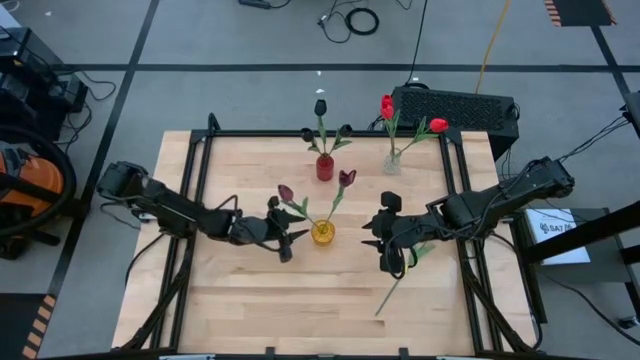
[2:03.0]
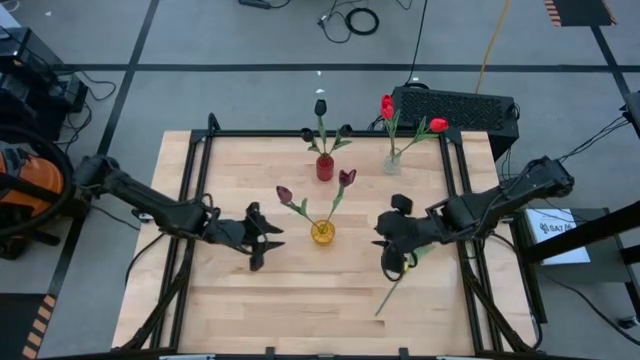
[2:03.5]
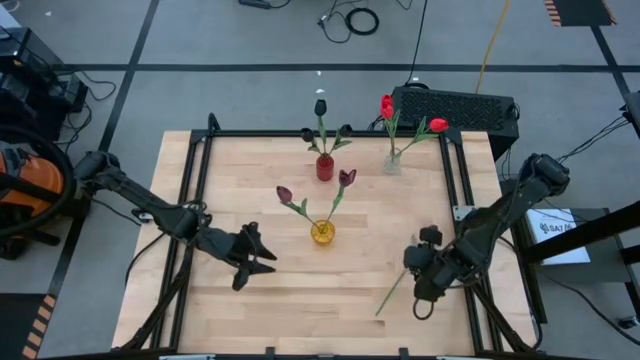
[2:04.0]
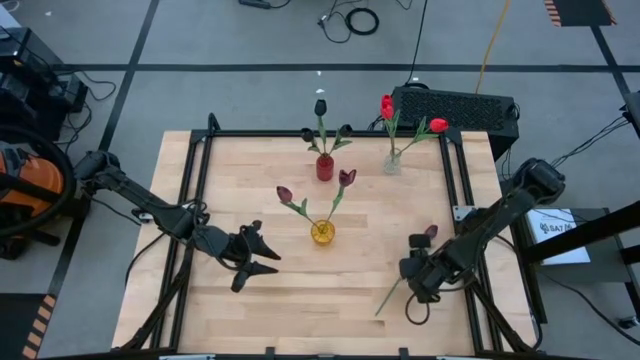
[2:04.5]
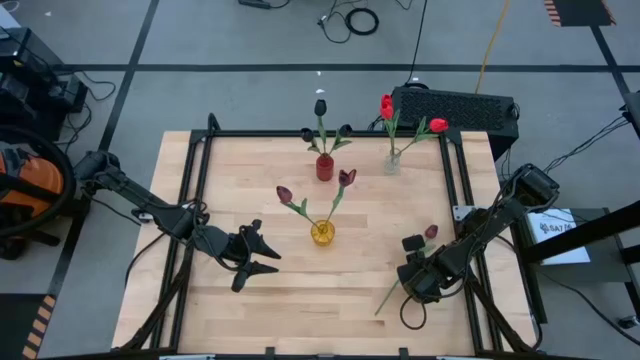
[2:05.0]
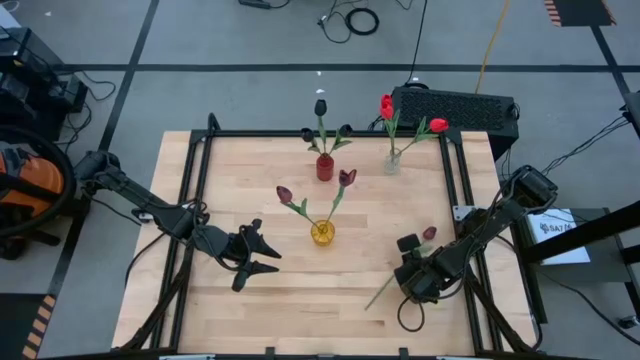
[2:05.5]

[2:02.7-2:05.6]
Task: Sort flowers into vase by color
Put the dark red flower into the yellow vase

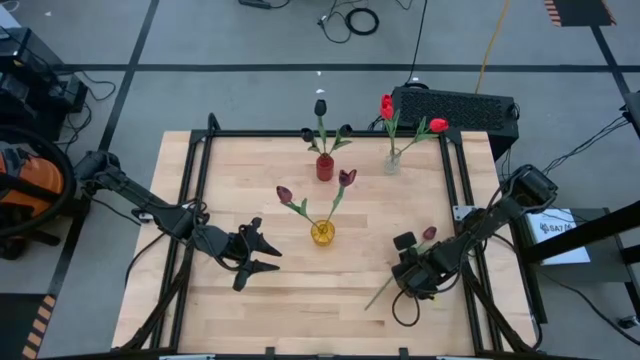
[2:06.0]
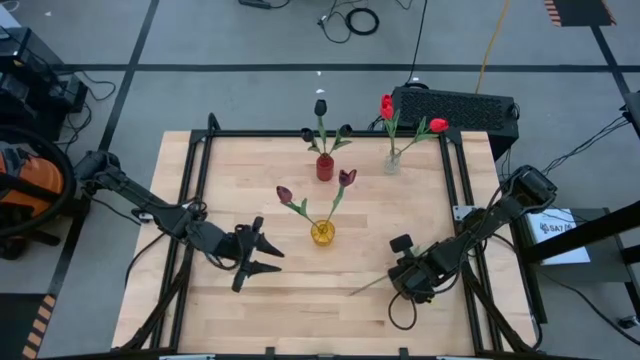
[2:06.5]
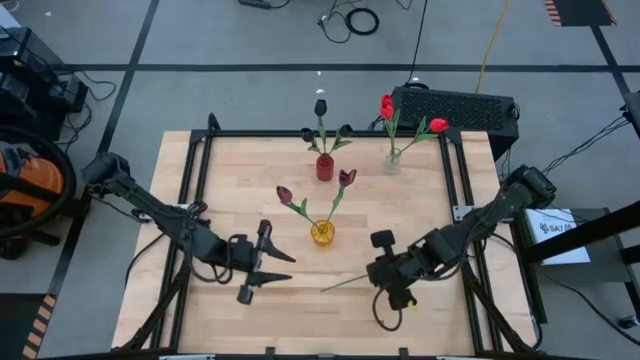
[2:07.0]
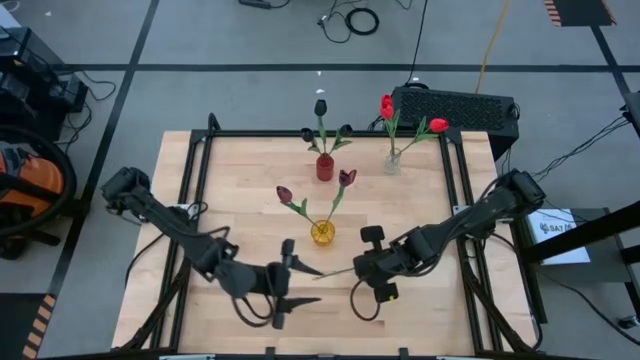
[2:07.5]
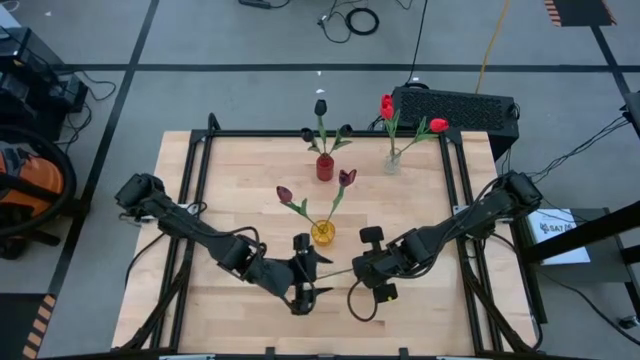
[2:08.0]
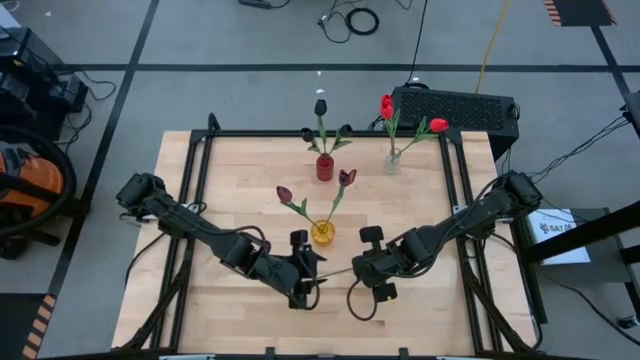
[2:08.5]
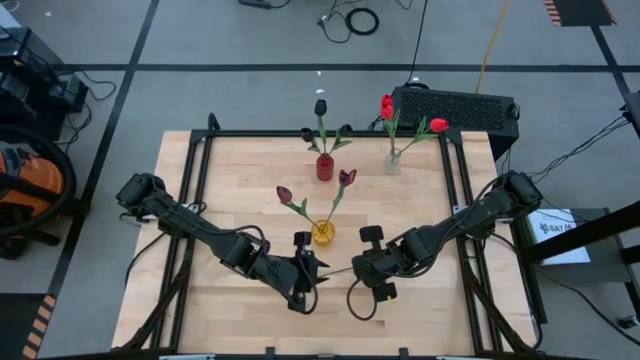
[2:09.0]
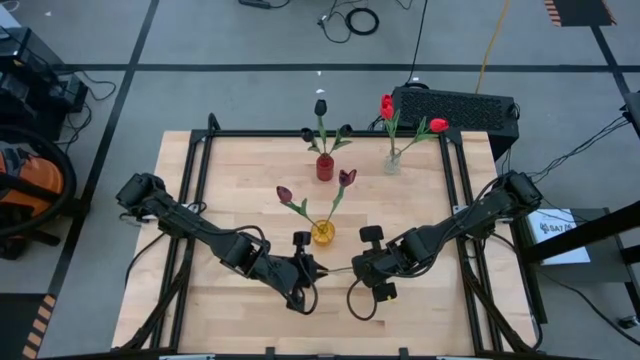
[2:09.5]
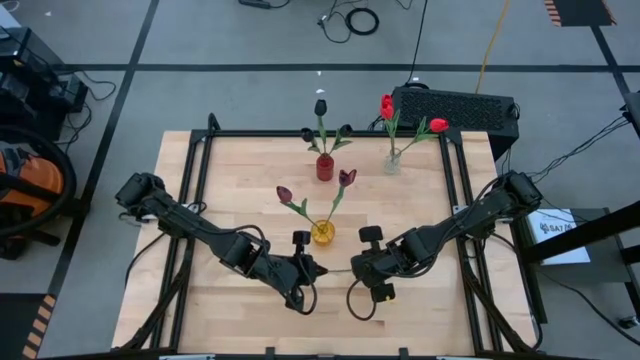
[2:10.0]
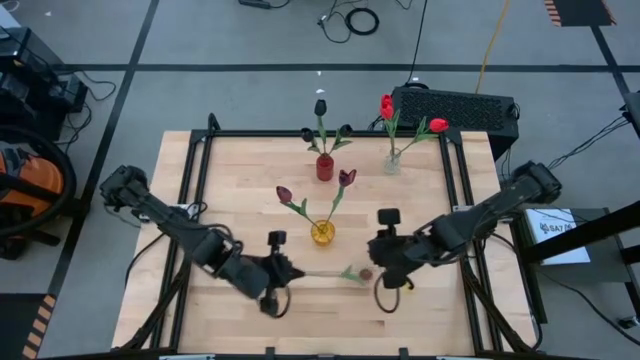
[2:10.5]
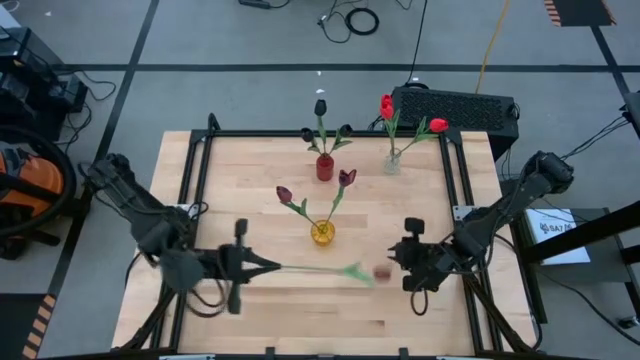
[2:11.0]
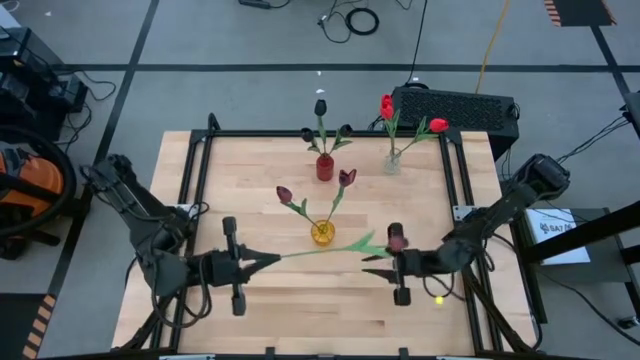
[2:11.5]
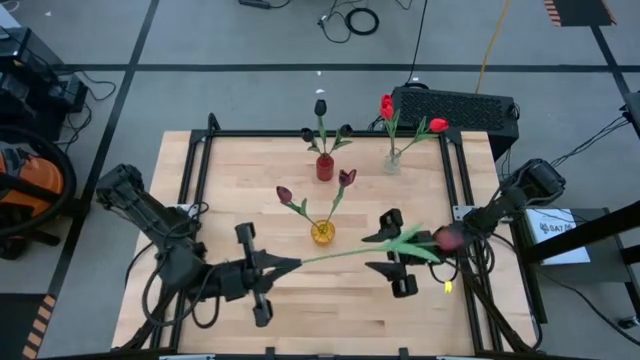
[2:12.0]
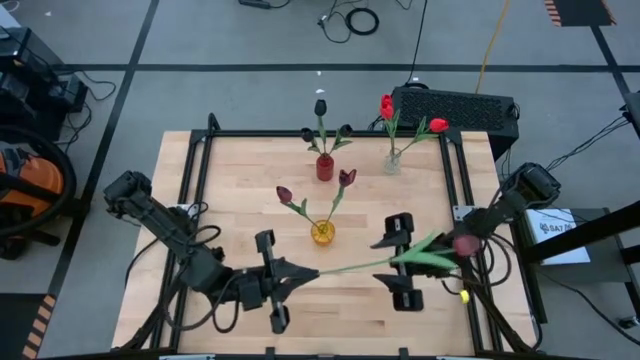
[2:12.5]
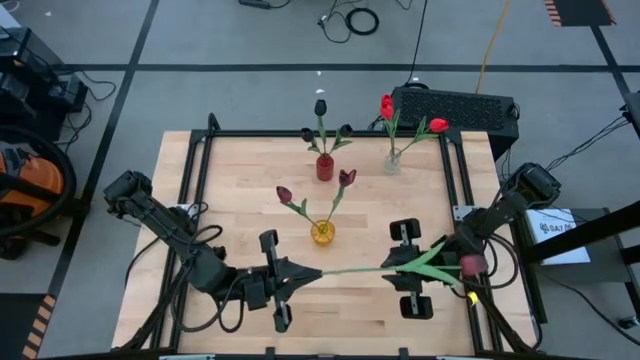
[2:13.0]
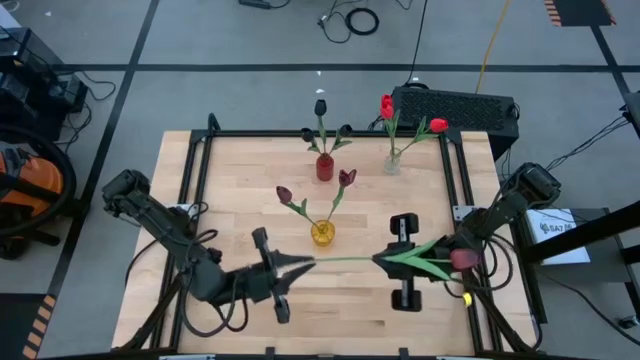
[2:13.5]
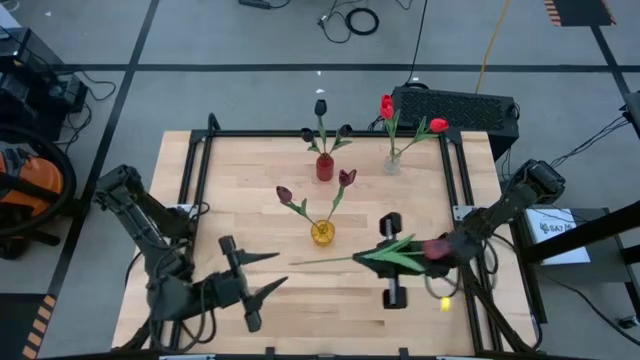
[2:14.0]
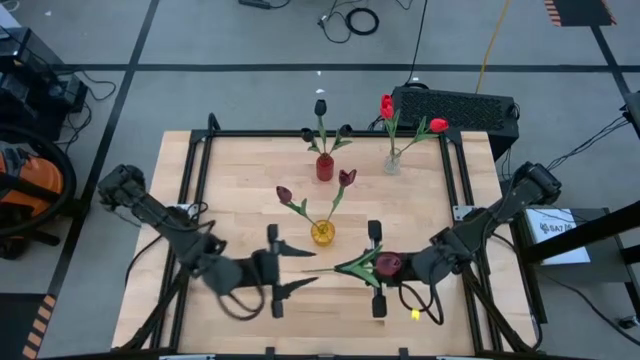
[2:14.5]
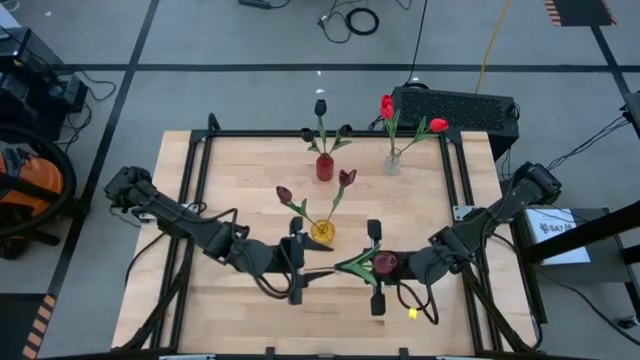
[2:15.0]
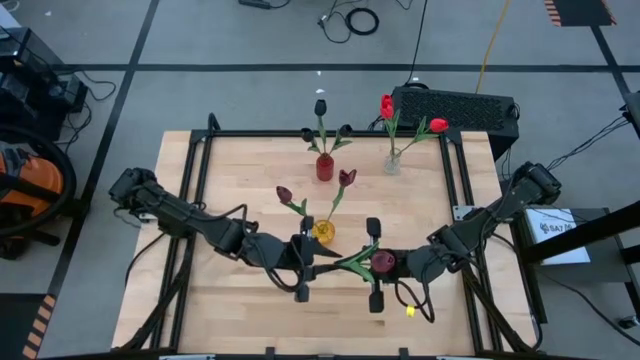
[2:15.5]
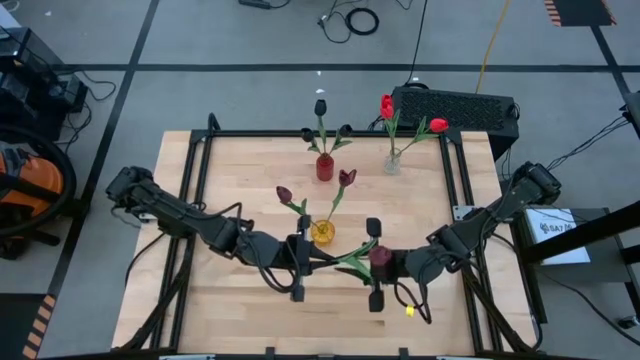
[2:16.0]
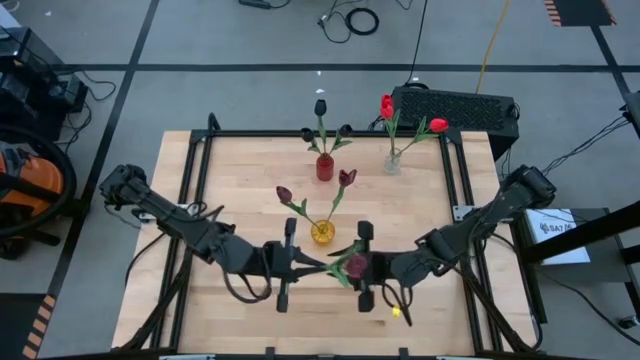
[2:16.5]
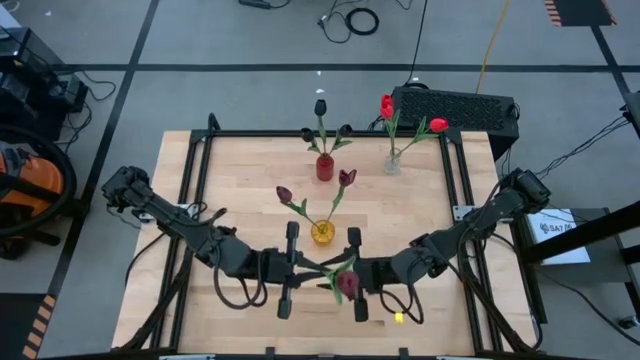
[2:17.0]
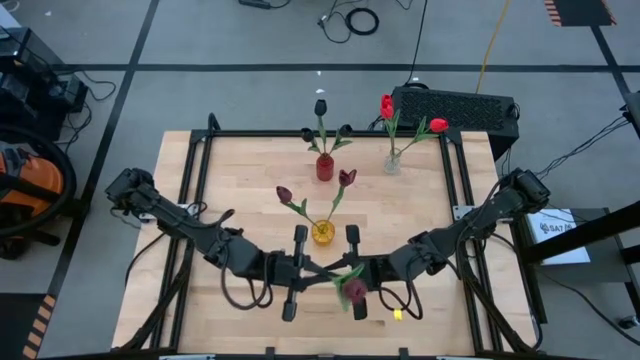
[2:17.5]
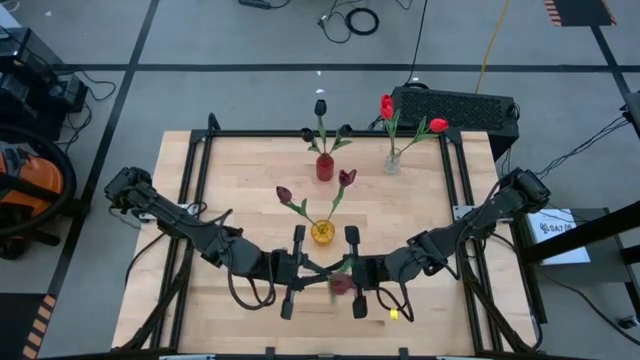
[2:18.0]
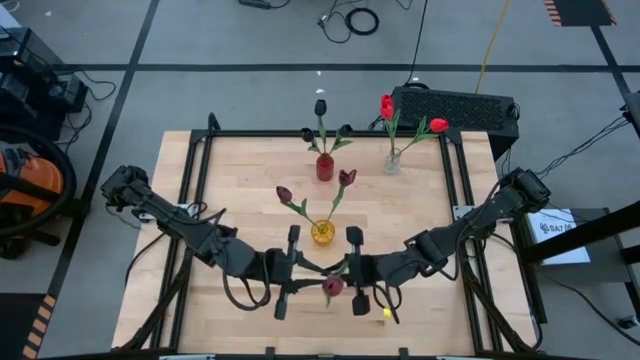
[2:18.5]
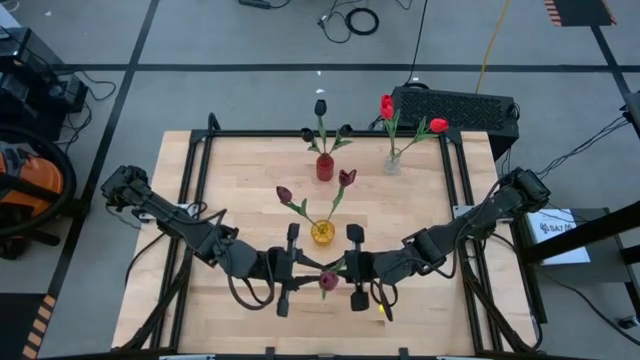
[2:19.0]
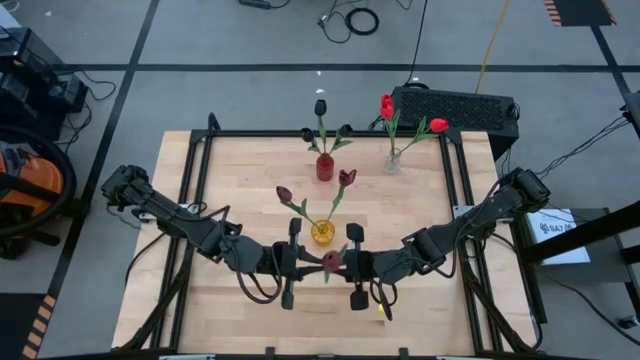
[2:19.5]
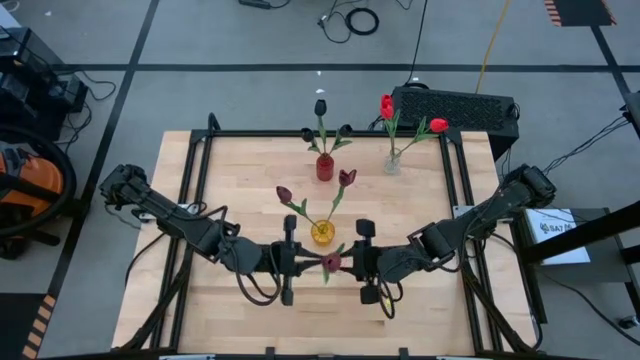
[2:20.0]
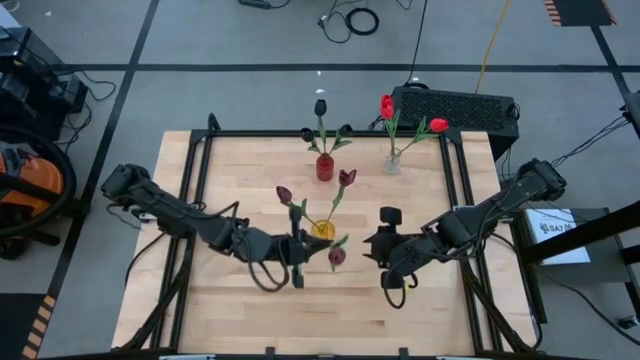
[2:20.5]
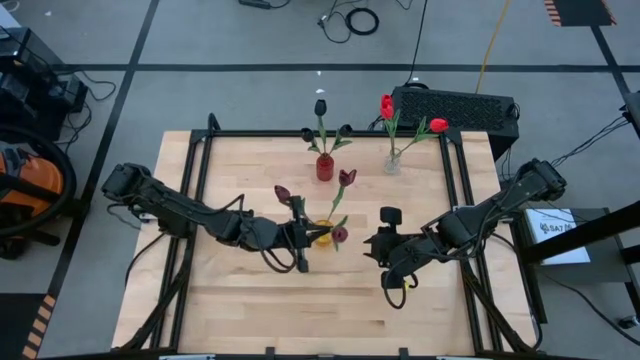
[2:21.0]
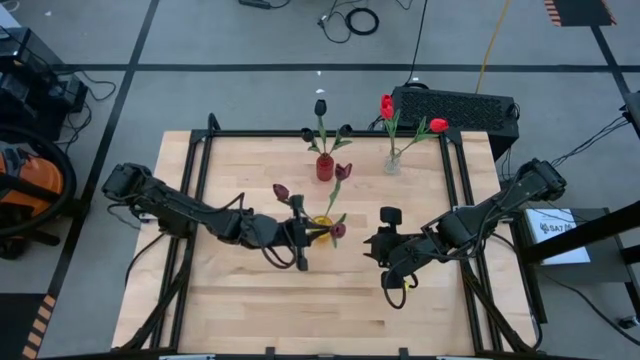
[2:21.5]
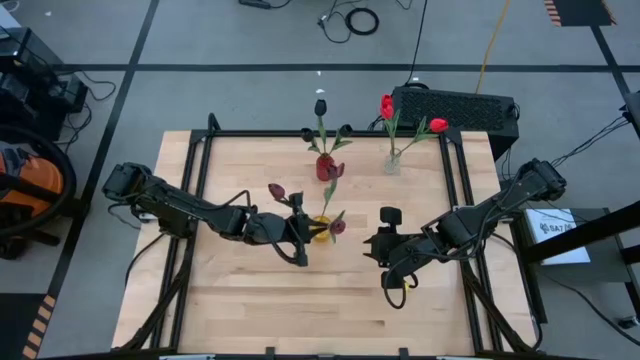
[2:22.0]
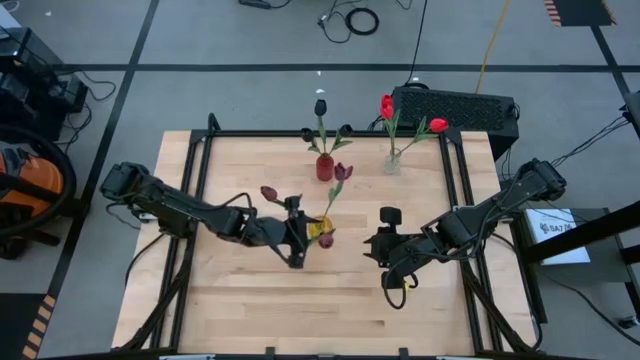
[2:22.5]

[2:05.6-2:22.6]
Put the dark red flower into the yellow vase

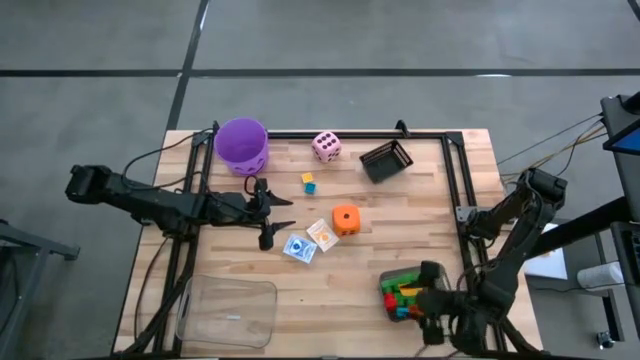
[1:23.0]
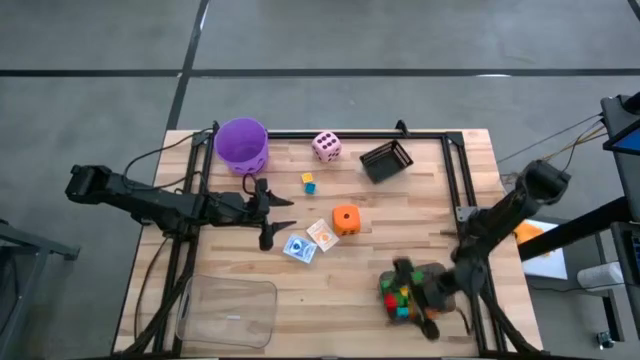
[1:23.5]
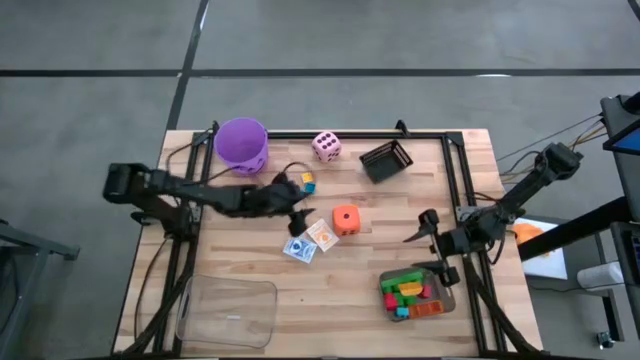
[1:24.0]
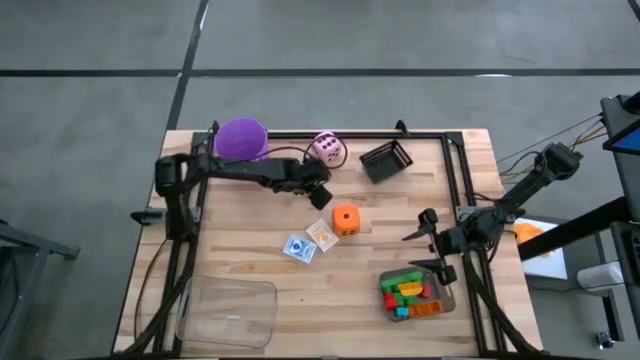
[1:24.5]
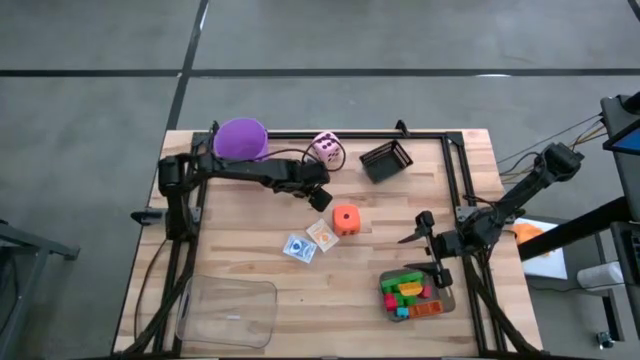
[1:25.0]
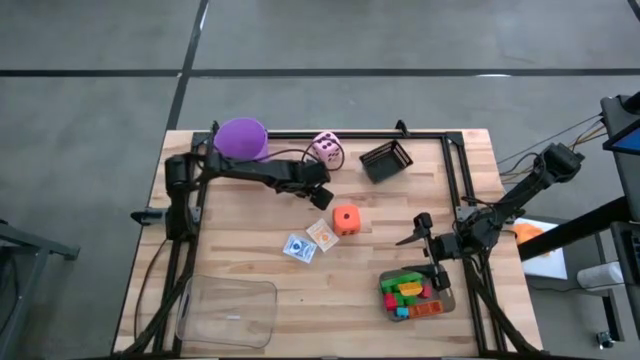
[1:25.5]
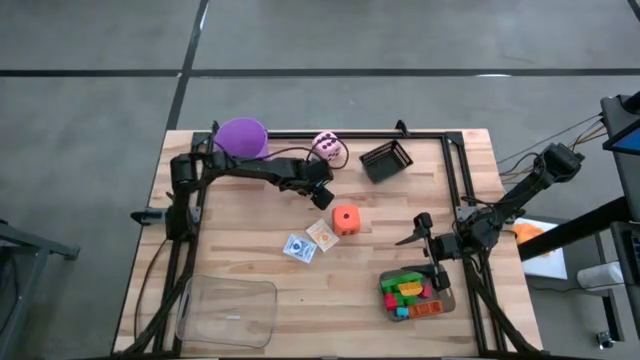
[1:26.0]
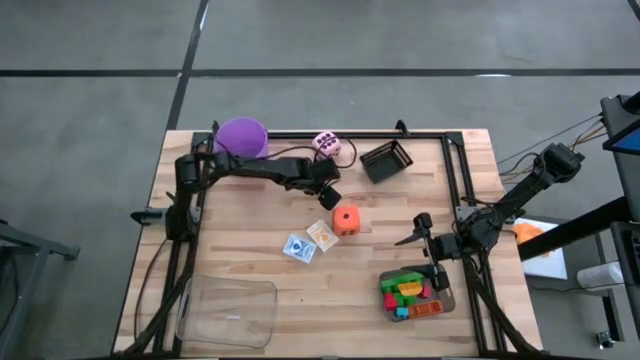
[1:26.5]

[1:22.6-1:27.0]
Task: Pick & Place Toys
Put the blue game piece into the black bin
